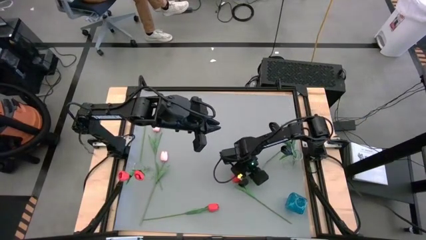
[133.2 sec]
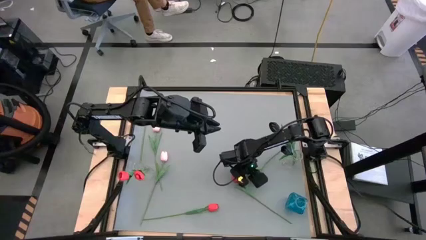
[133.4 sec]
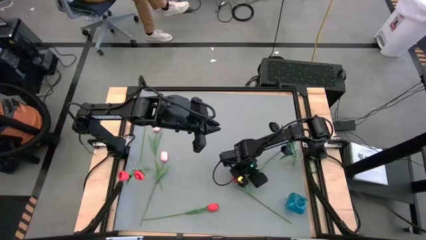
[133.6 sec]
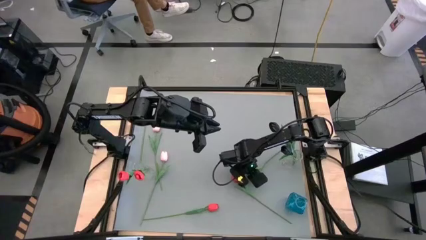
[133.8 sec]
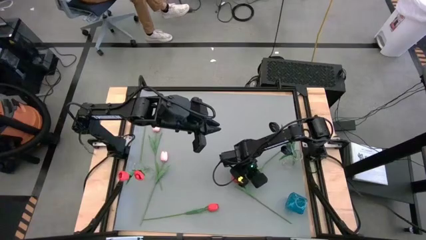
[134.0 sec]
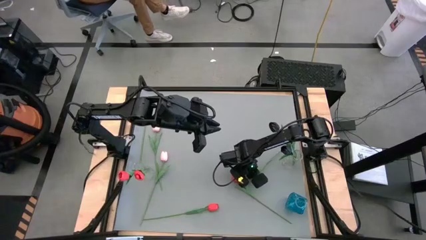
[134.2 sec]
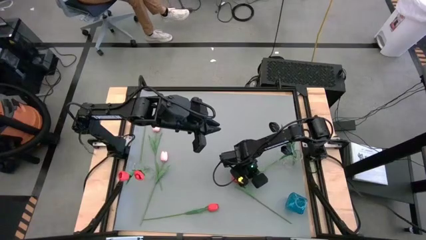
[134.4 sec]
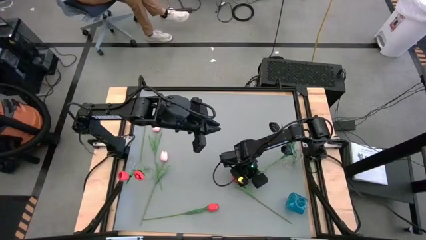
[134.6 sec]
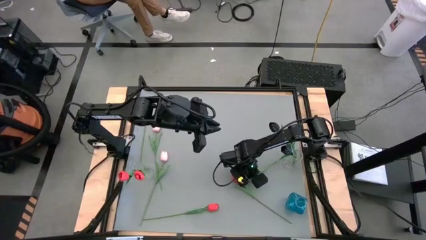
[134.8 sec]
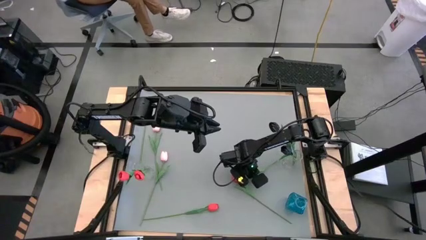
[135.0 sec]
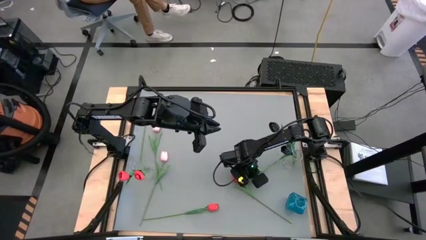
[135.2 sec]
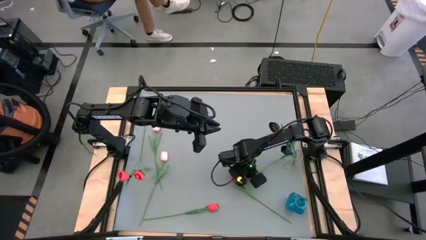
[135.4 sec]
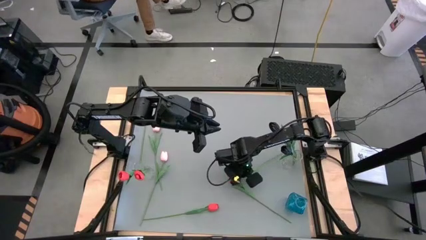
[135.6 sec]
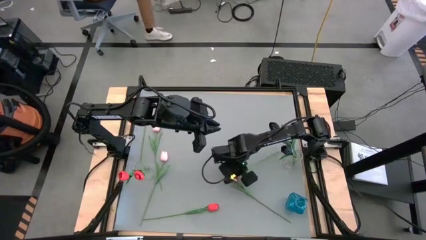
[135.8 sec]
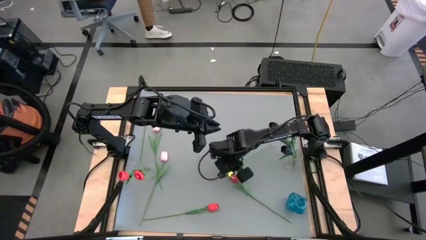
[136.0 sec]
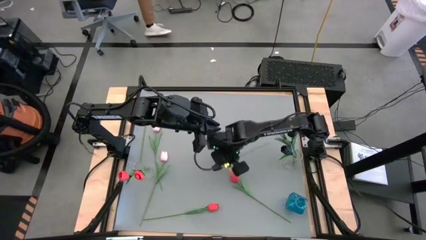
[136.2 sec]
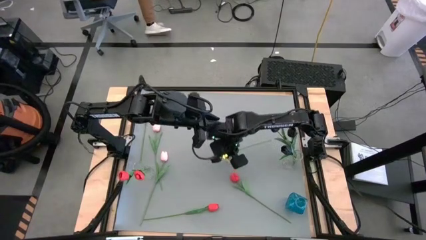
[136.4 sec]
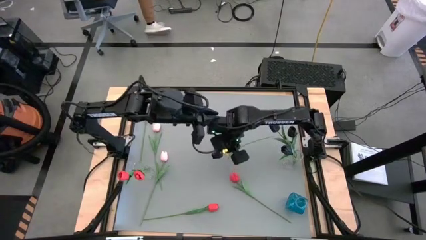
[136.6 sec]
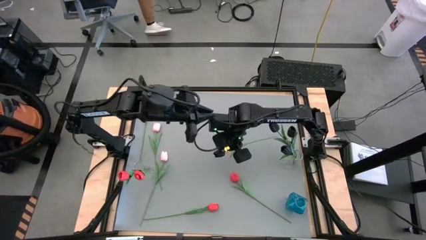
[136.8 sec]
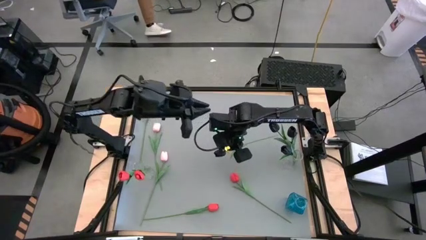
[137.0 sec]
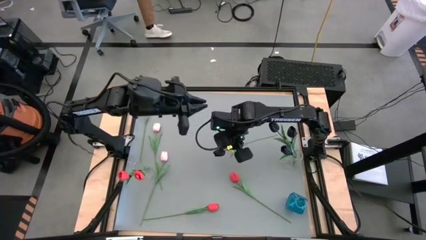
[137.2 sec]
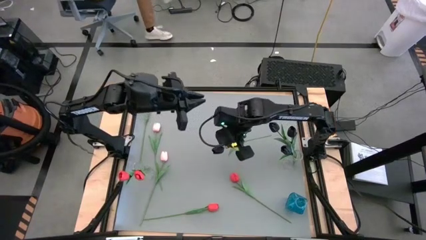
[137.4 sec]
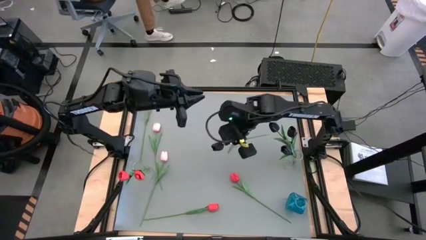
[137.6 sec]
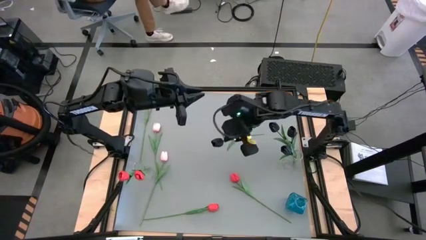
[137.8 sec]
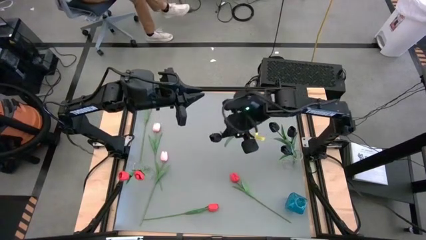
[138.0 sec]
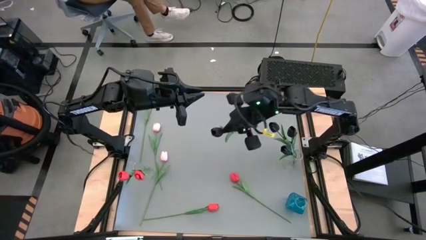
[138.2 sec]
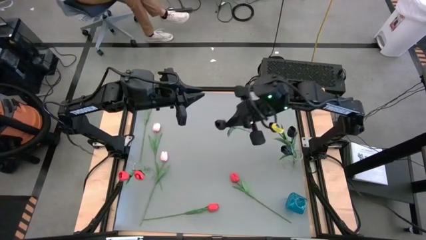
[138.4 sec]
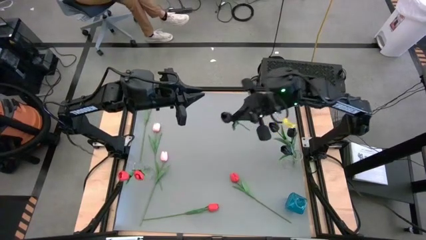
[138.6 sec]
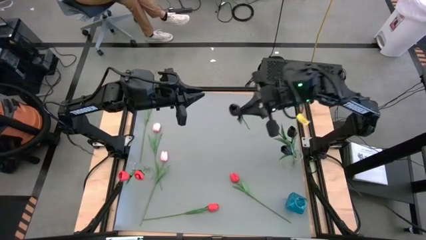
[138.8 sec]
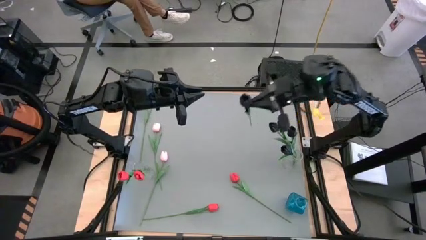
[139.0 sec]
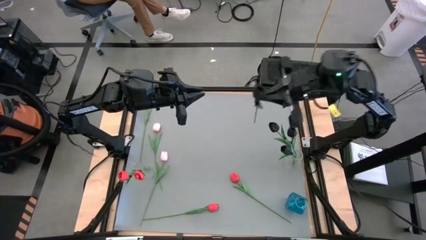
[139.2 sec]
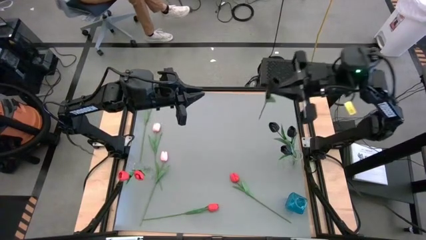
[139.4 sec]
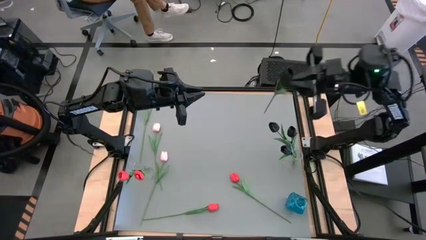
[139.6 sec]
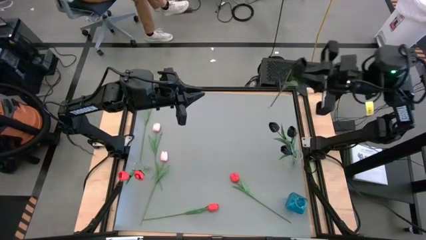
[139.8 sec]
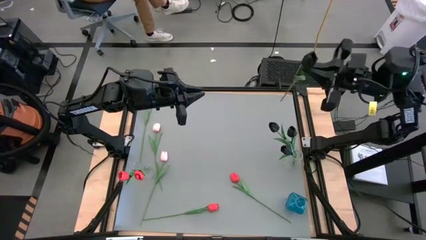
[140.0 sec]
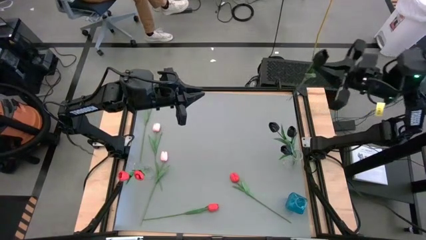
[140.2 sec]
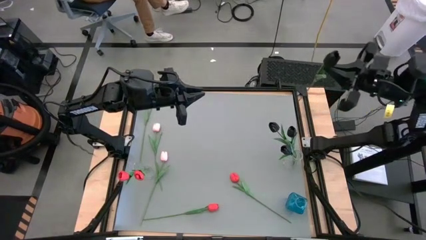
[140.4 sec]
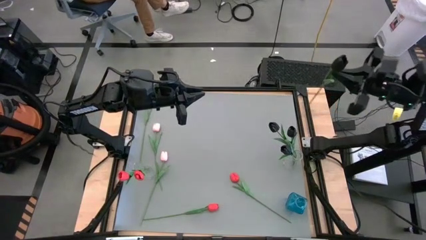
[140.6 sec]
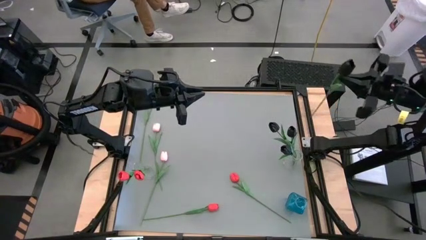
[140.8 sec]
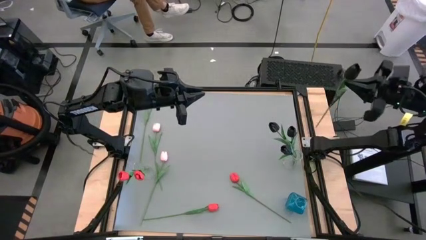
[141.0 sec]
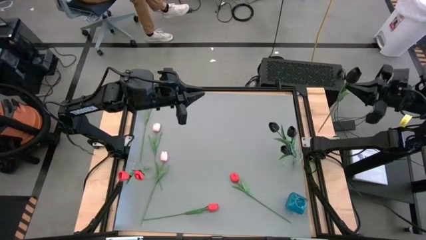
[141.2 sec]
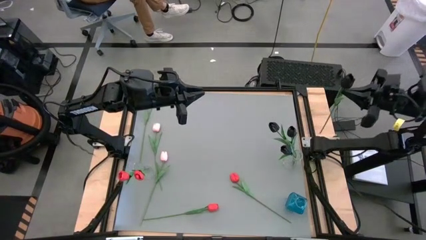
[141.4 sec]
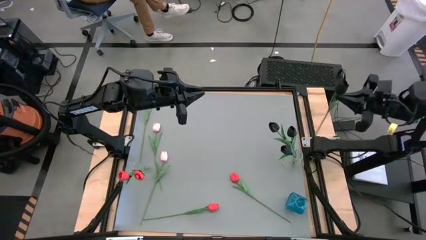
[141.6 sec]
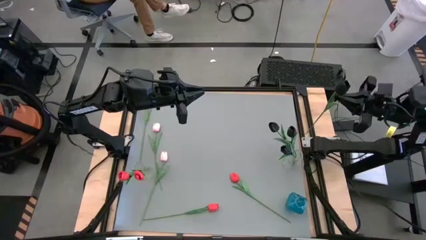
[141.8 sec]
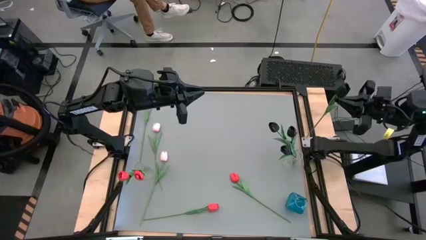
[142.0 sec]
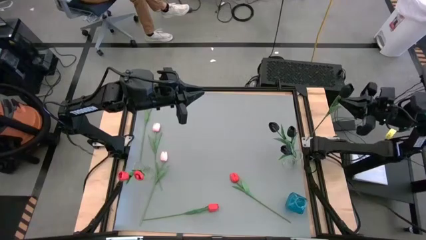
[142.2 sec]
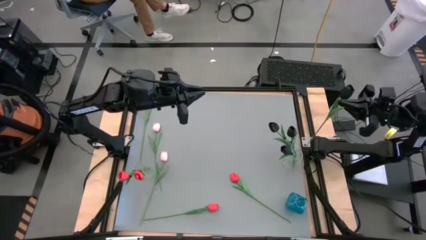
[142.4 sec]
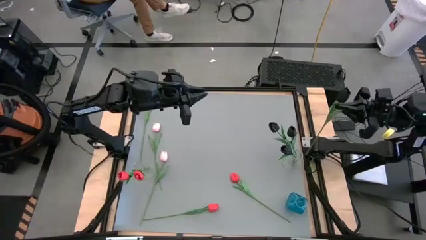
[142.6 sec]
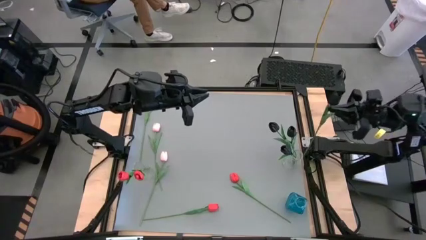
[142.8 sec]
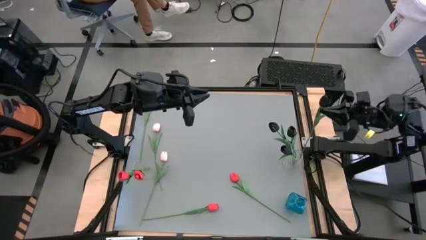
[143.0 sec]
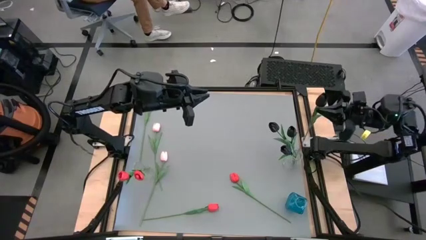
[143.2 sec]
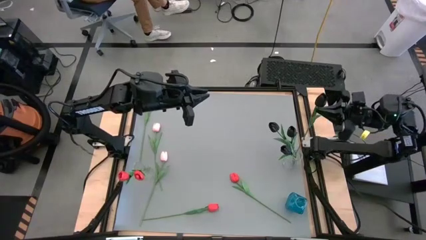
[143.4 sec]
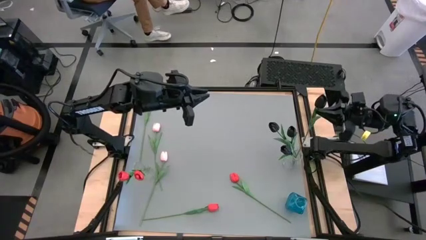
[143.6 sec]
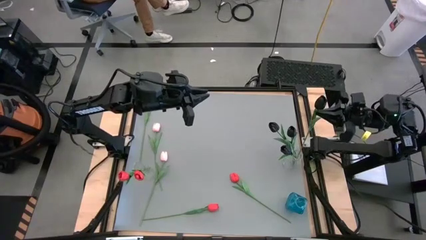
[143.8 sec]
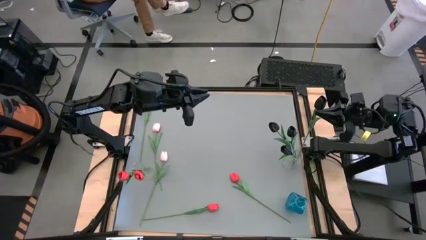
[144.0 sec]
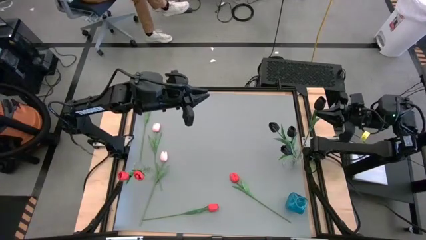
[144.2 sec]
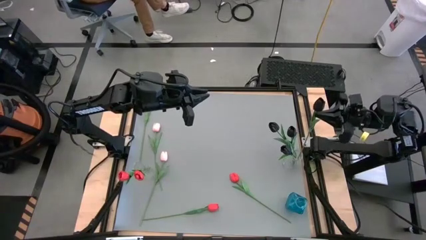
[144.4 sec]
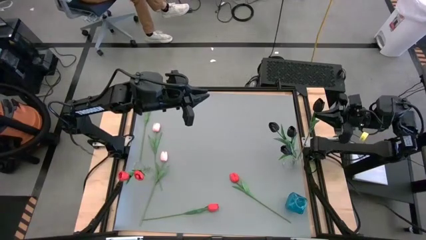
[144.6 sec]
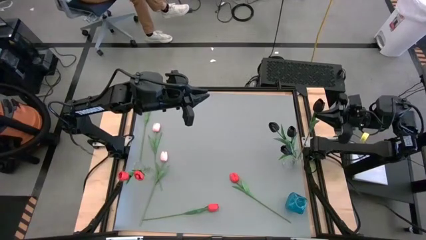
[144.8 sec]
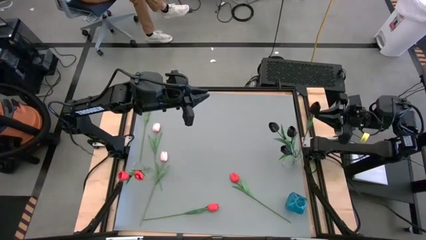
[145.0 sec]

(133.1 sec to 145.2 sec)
Task: Sort flowers into vase by color
Put the black tulip into the right transparent vase

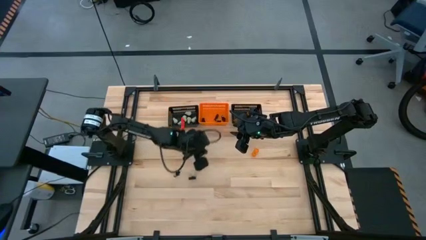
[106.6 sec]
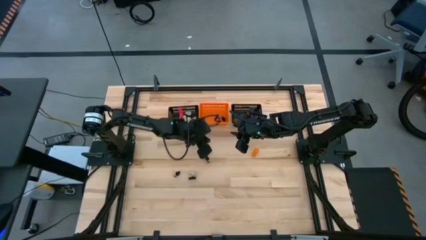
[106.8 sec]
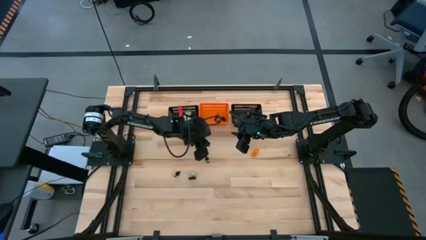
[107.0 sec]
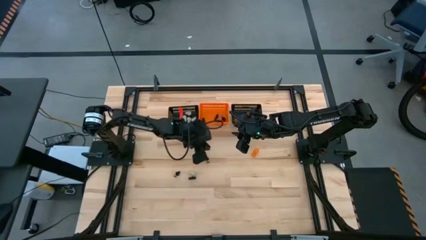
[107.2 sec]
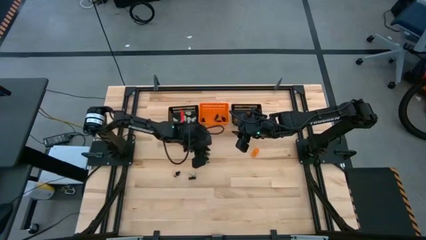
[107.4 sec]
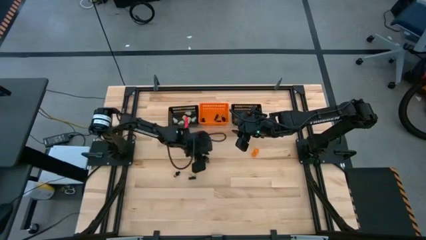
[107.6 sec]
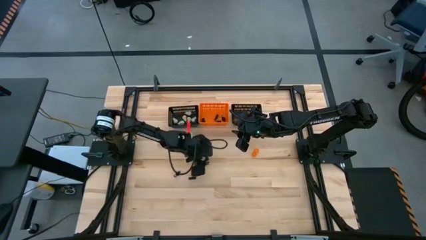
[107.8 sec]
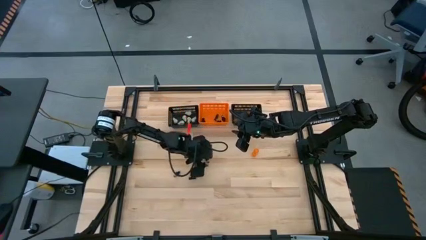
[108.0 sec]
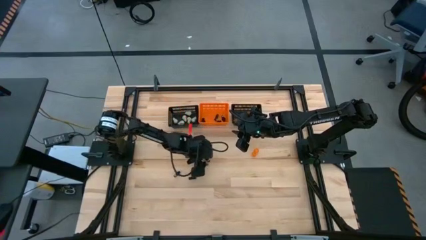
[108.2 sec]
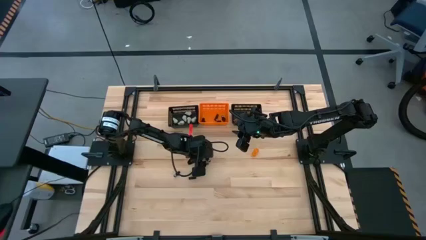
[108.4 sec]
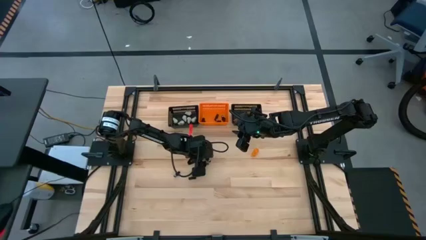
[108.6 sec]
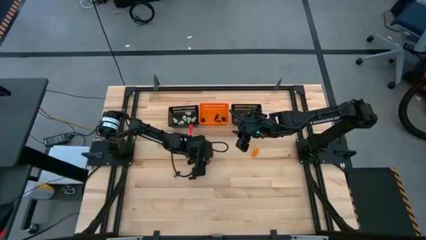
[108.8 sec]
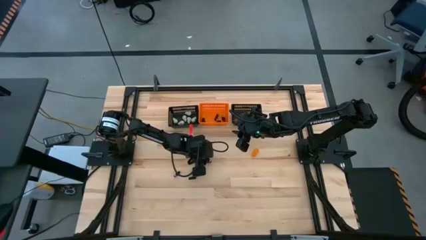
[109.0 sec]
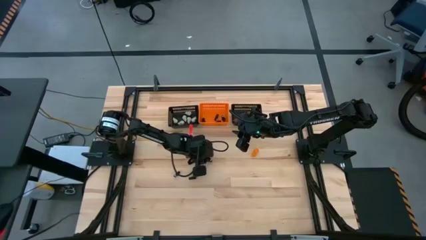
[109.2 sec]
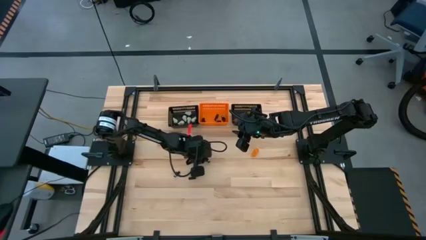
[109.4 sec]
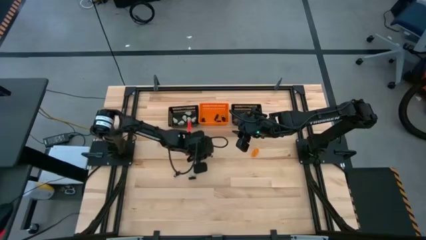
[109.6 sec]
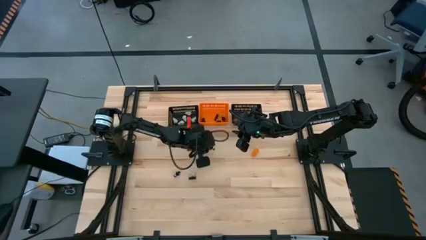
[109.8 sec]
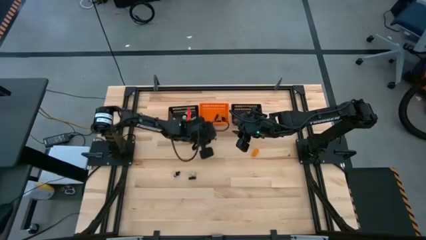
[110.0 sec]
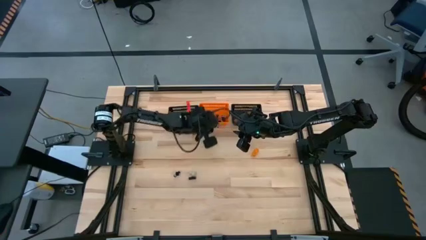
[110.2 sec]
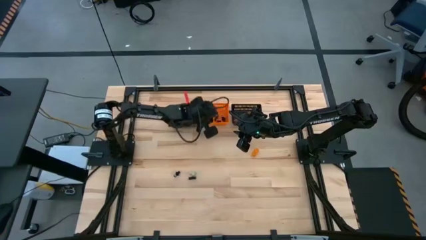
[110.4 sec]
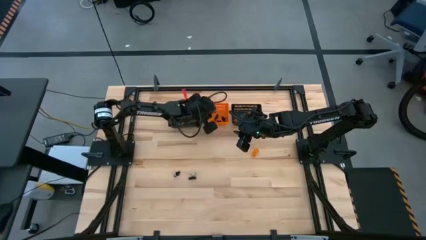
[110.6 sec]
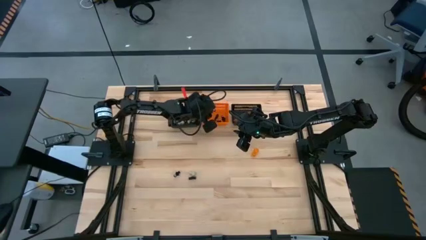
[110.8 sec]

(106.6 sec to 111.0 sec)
Task: Sort Halloween decoration
Put the black skeleton toy into the orange bin
